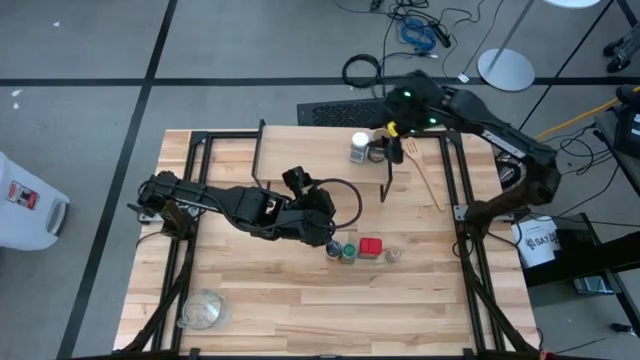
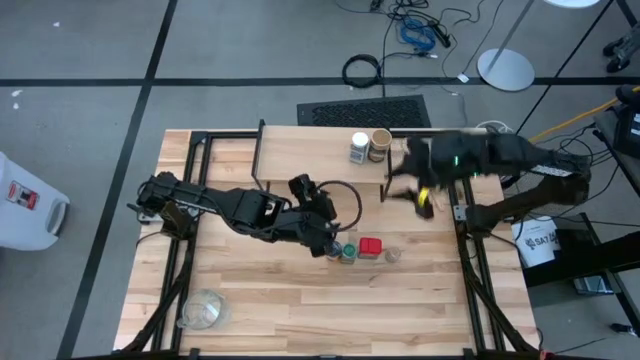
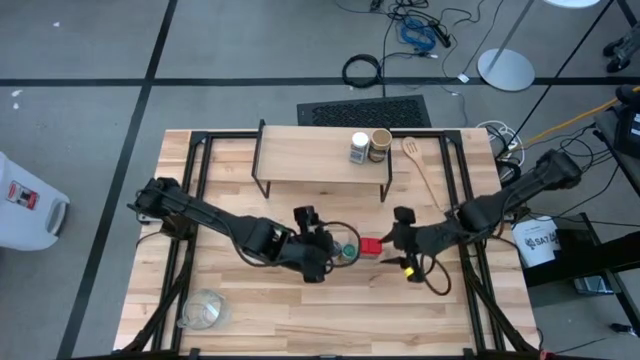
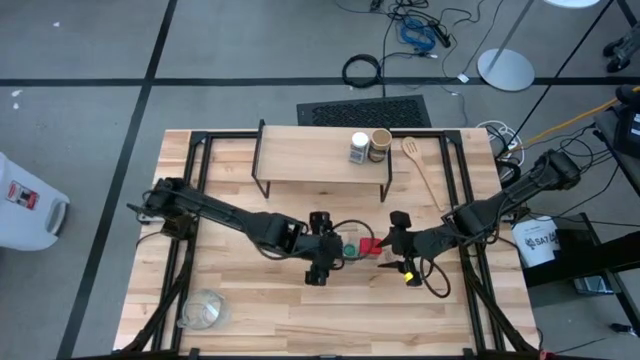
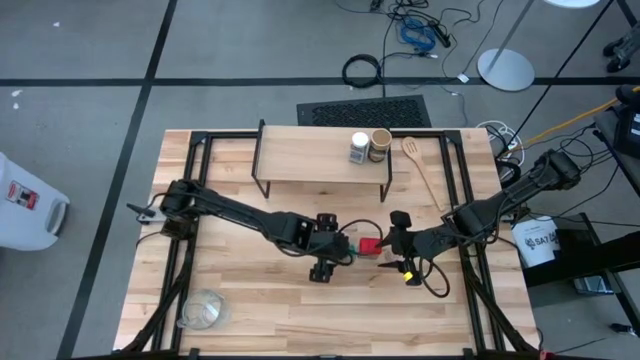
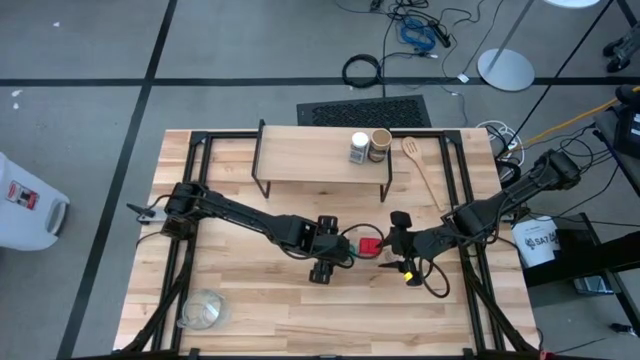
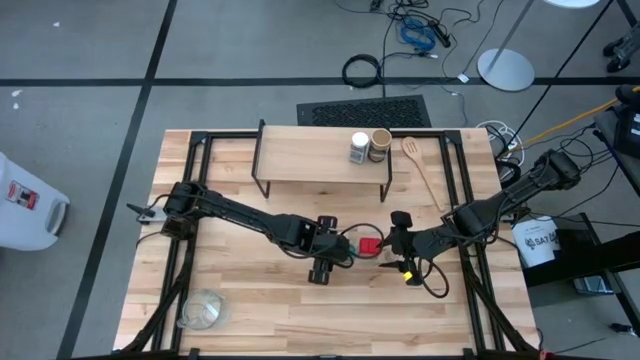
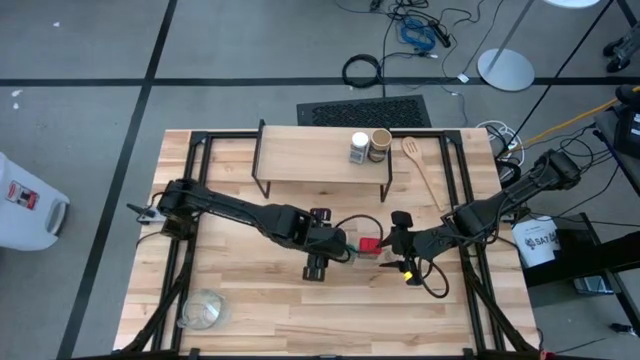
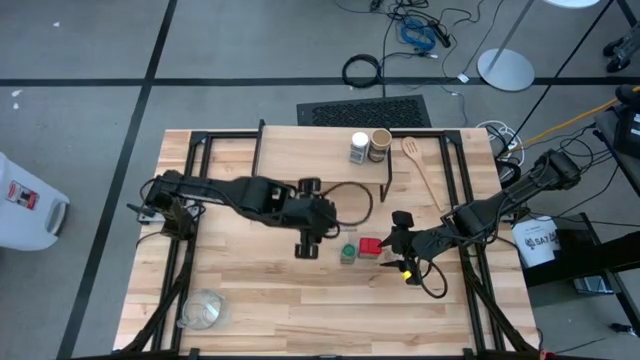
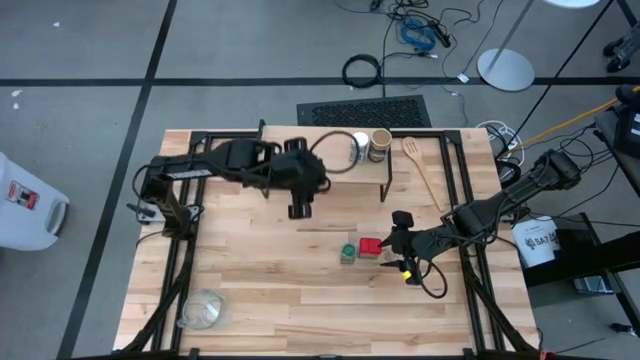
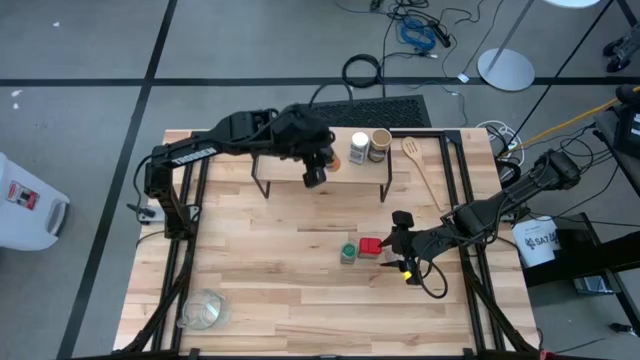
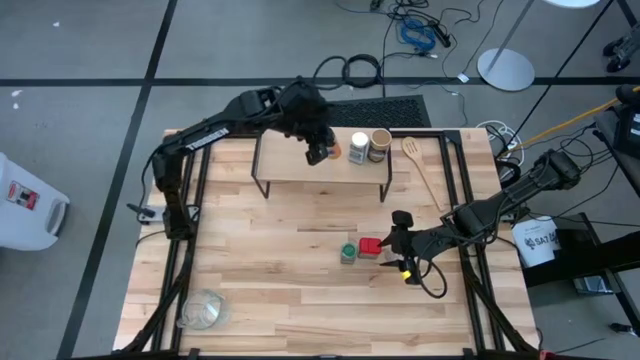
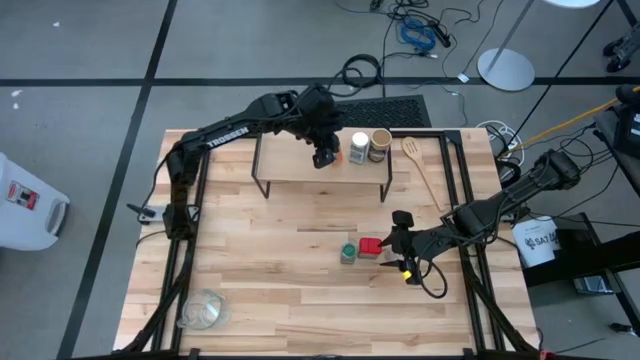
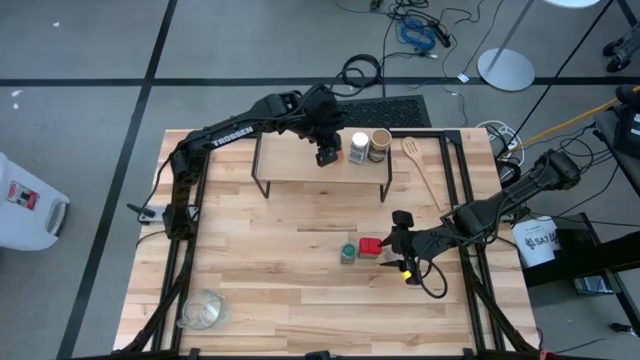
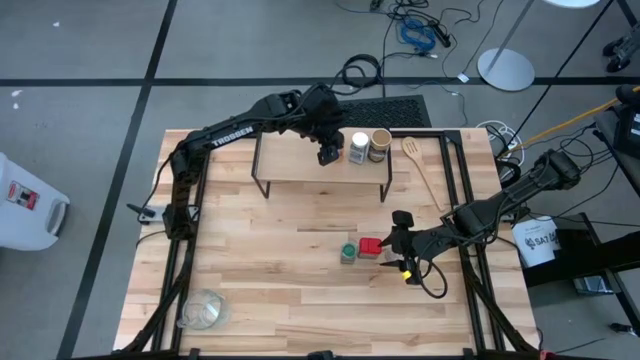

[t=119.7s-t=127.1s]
Task: Shelf spices
Put the black seasoning bottle on the shelf

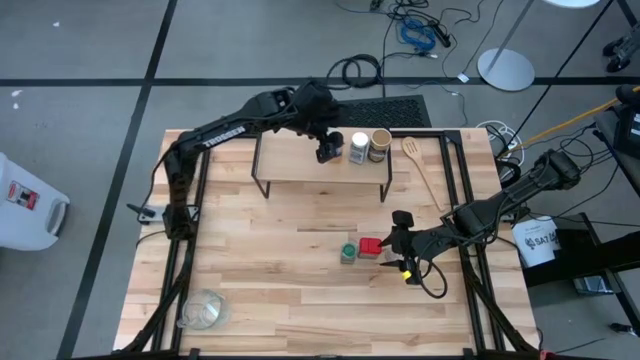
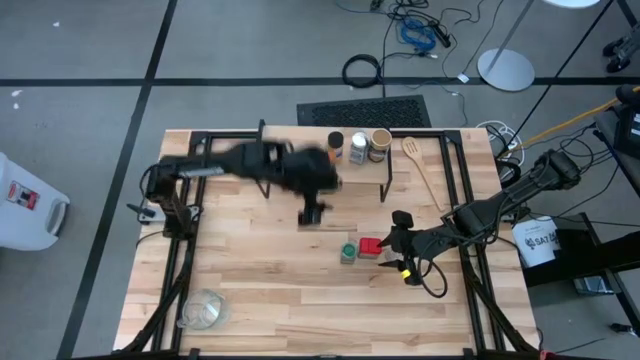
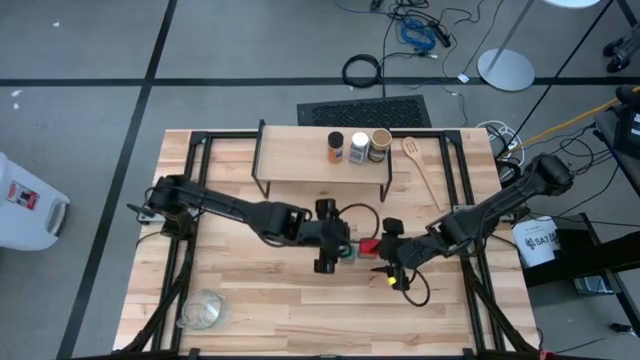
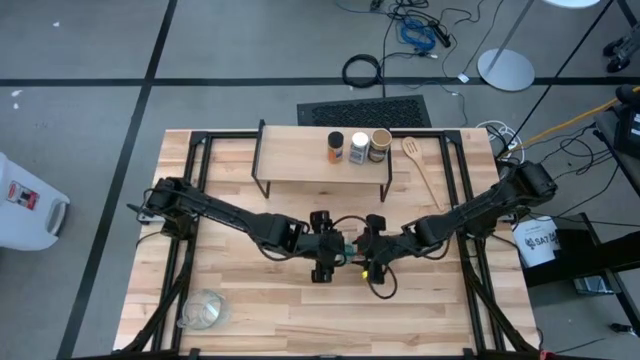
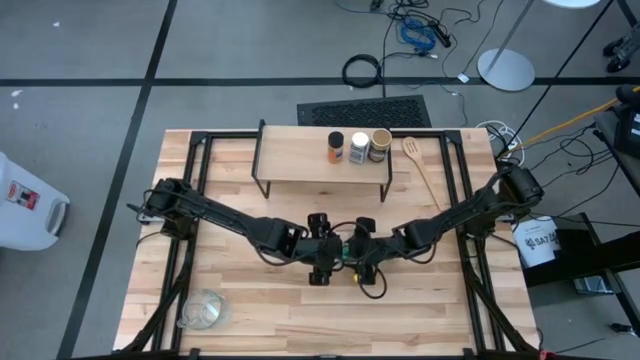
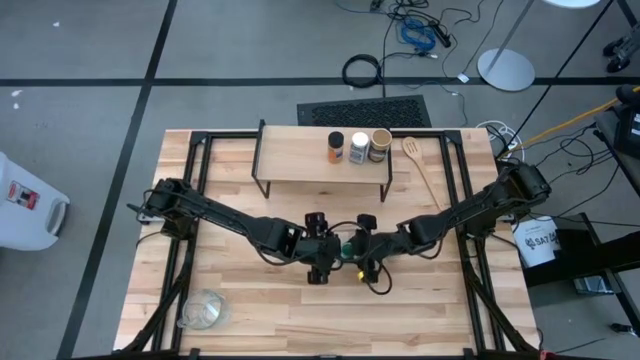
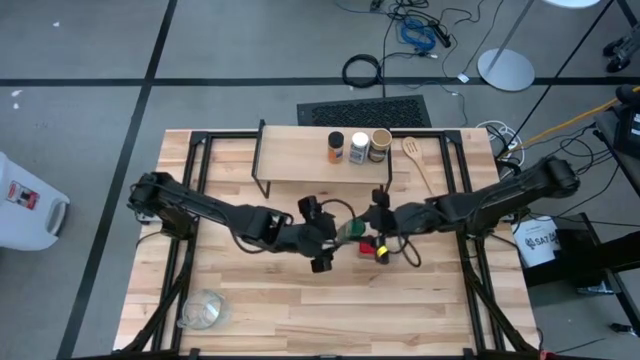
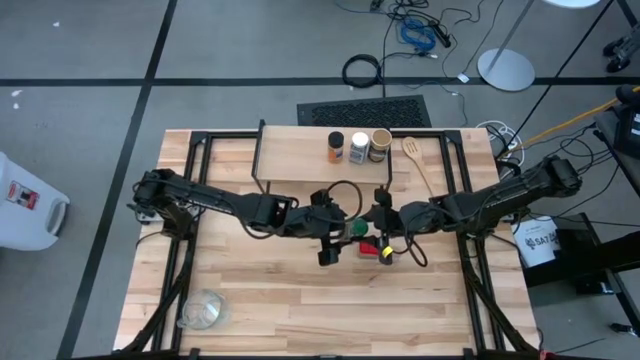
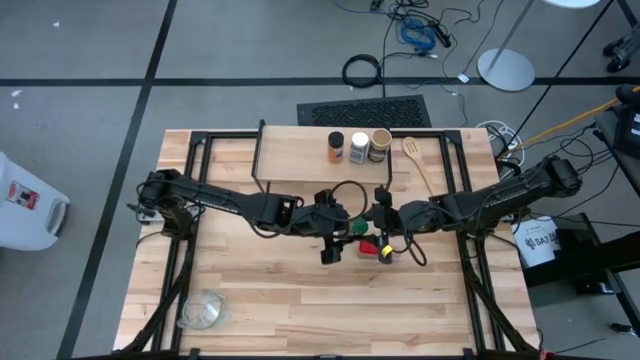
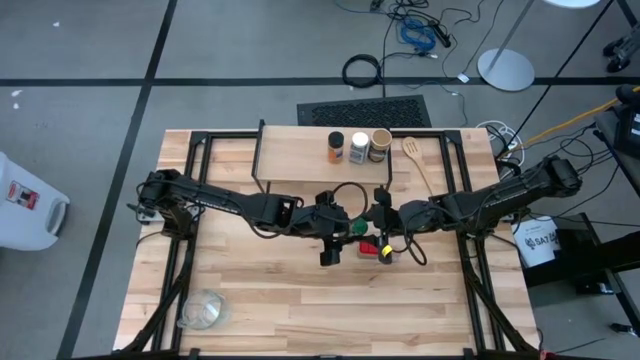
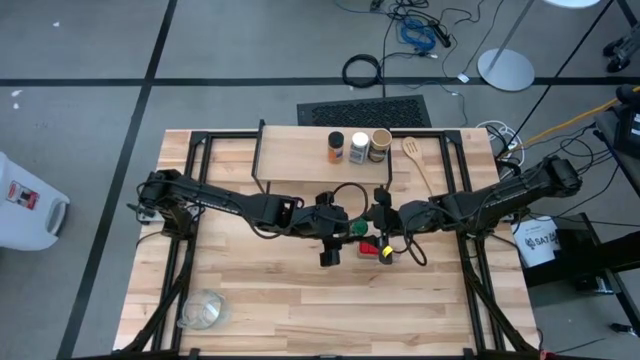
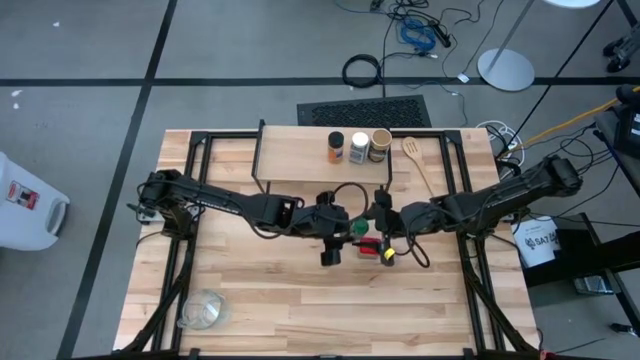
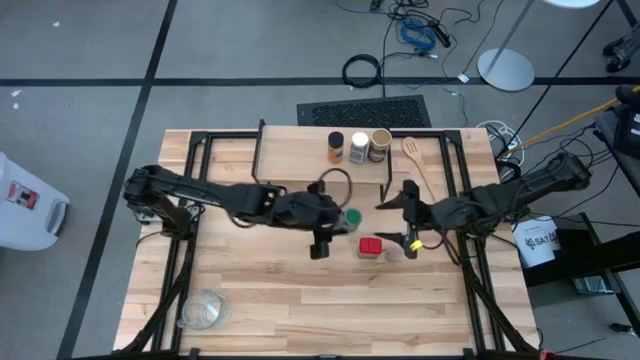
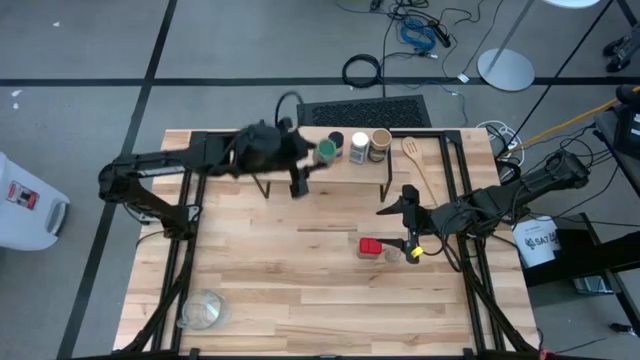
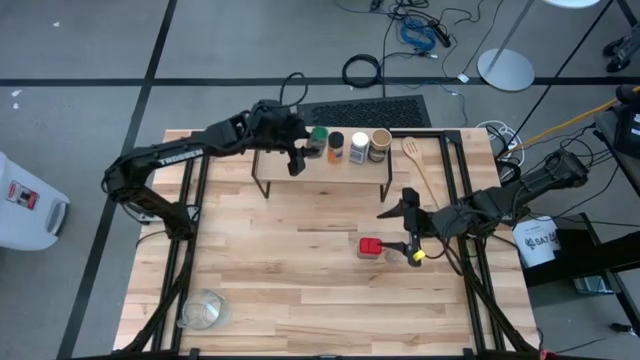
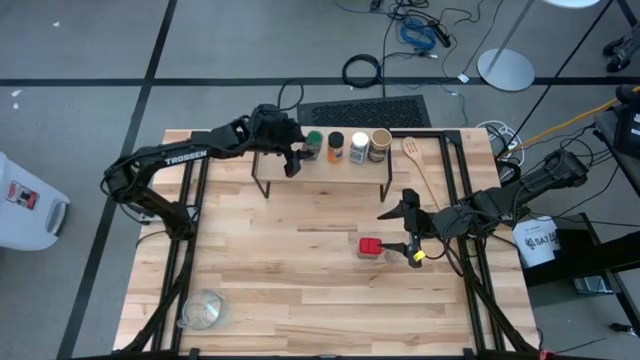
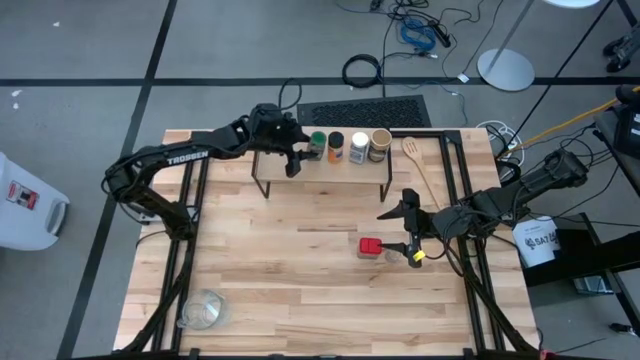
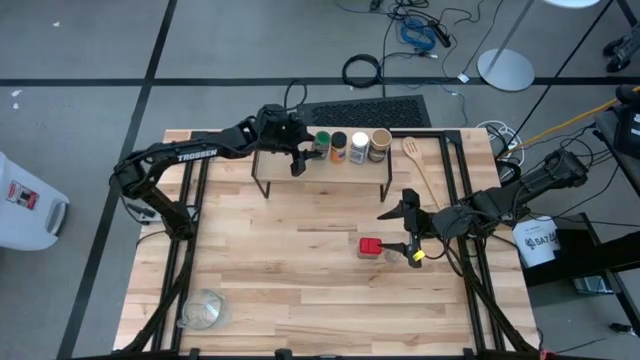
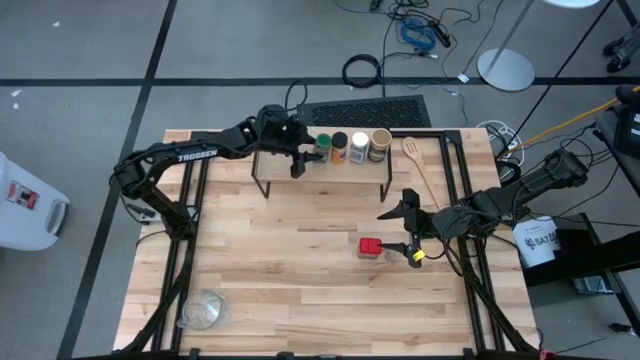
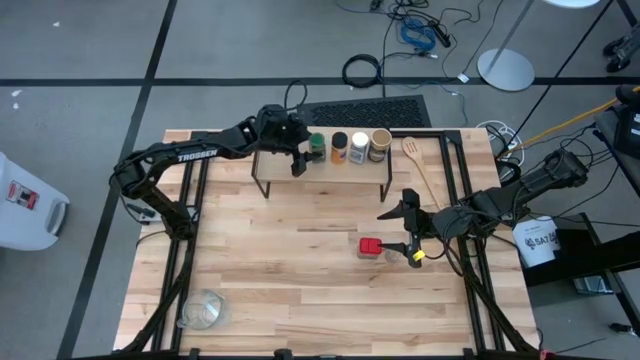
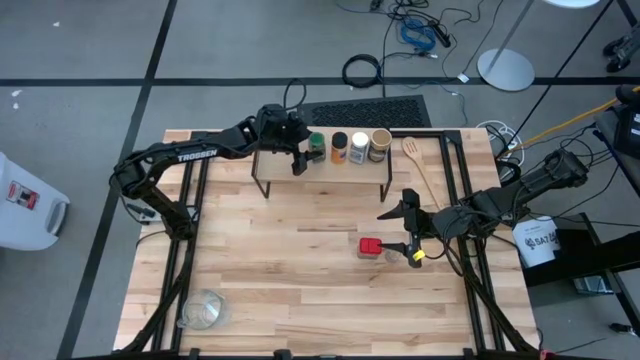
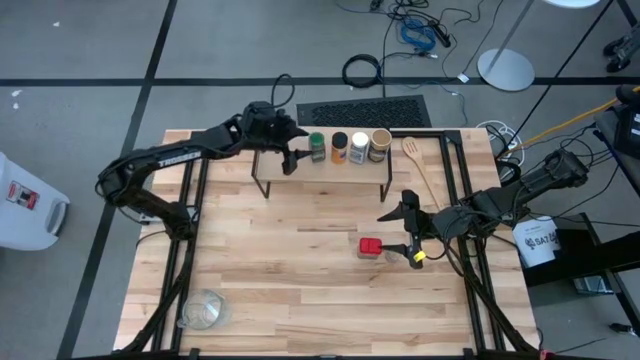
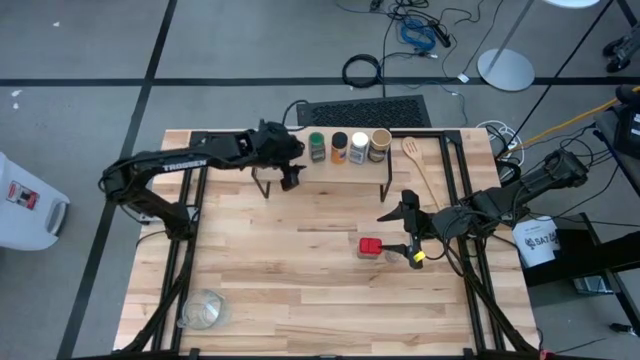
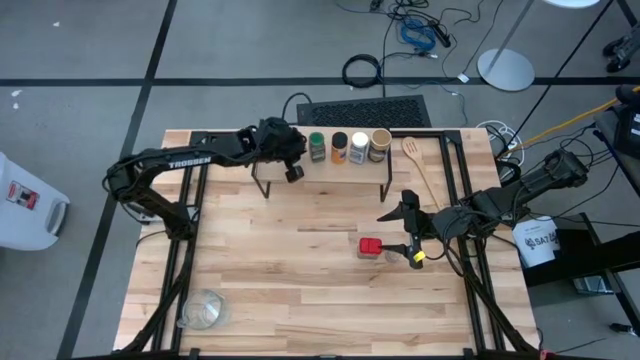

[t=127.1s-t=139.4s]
Put the green seasoning bottle on the shelf
